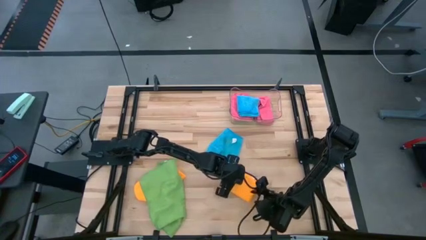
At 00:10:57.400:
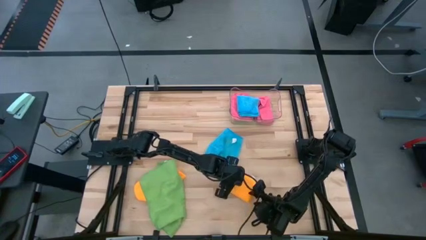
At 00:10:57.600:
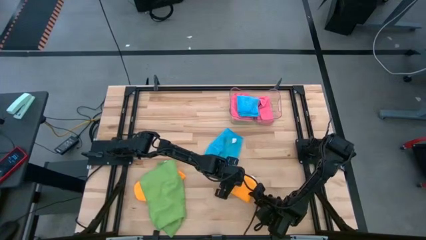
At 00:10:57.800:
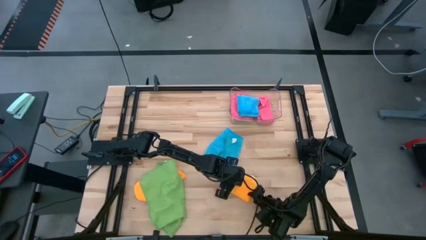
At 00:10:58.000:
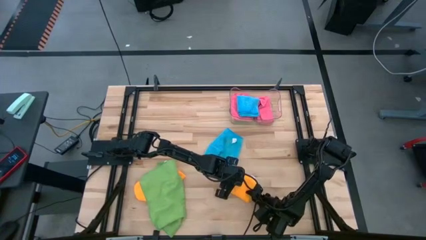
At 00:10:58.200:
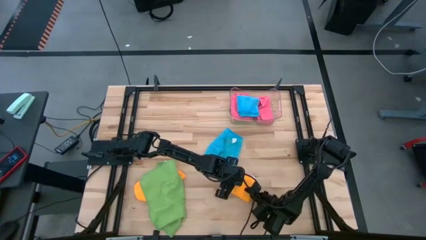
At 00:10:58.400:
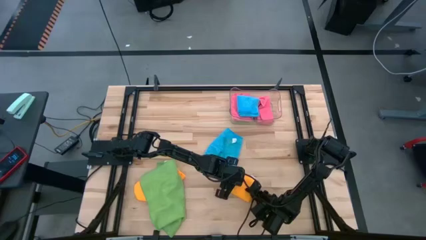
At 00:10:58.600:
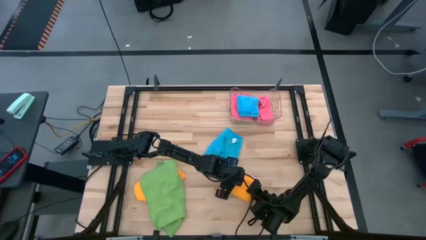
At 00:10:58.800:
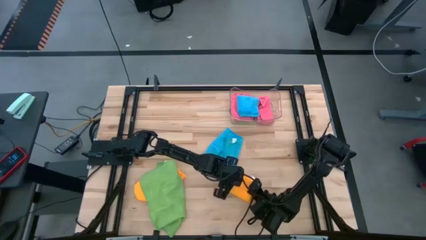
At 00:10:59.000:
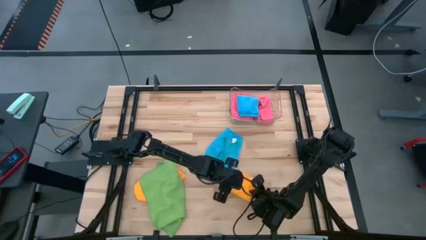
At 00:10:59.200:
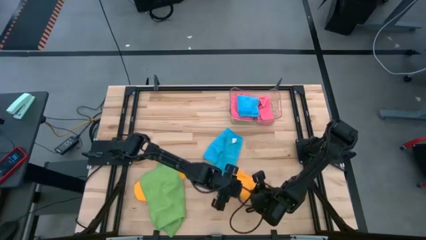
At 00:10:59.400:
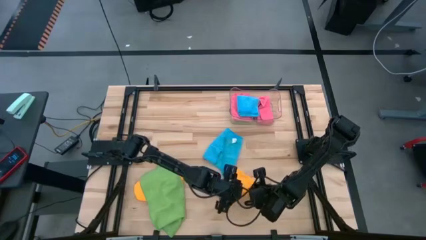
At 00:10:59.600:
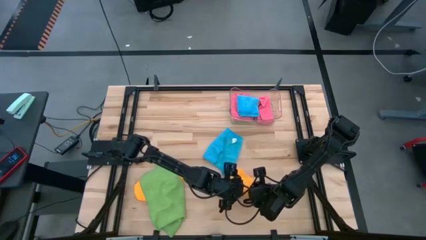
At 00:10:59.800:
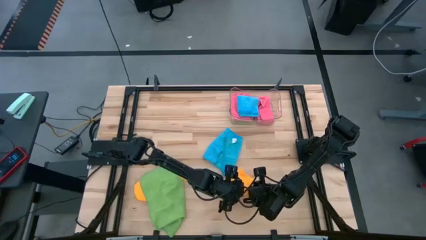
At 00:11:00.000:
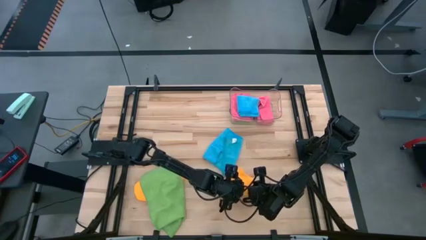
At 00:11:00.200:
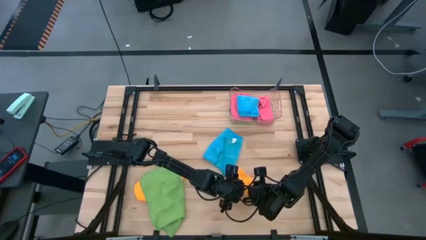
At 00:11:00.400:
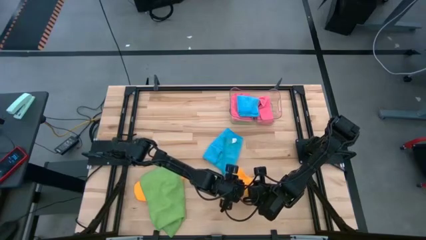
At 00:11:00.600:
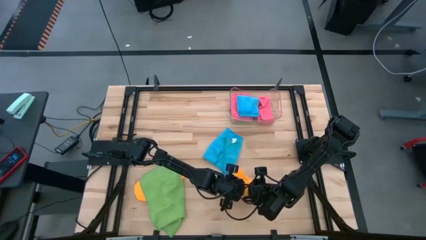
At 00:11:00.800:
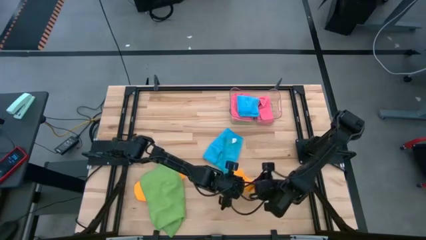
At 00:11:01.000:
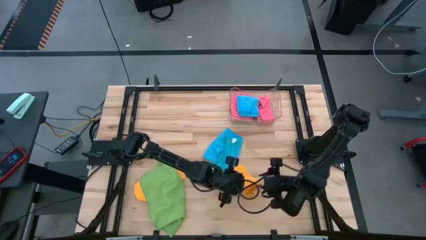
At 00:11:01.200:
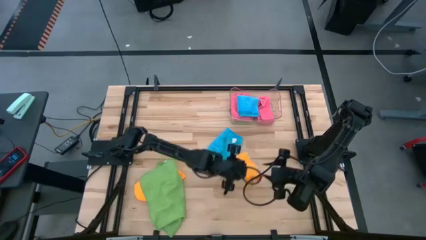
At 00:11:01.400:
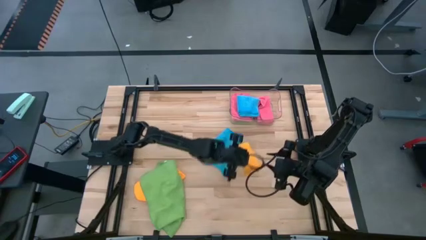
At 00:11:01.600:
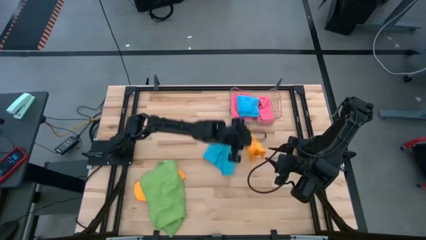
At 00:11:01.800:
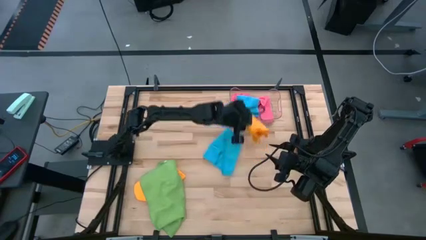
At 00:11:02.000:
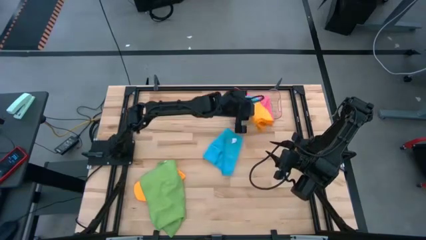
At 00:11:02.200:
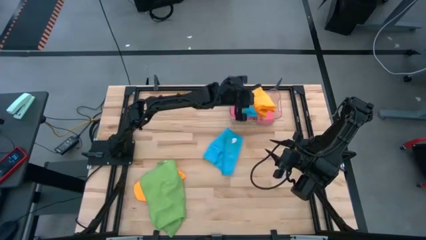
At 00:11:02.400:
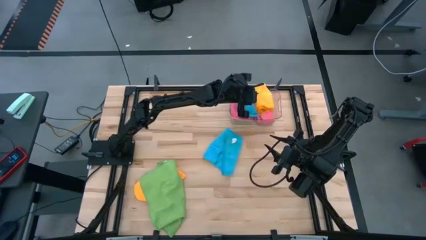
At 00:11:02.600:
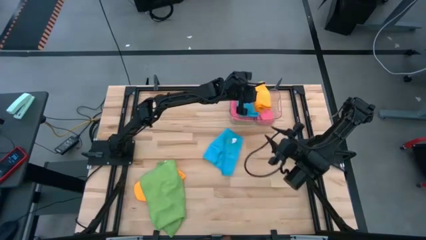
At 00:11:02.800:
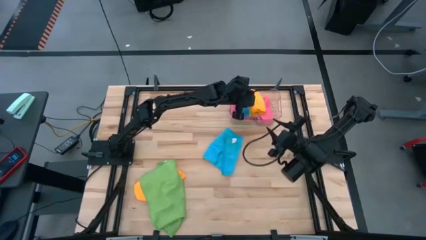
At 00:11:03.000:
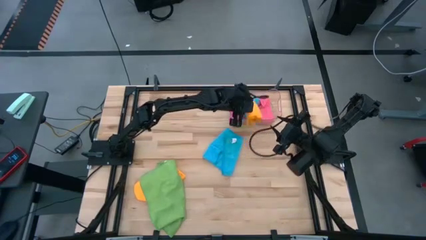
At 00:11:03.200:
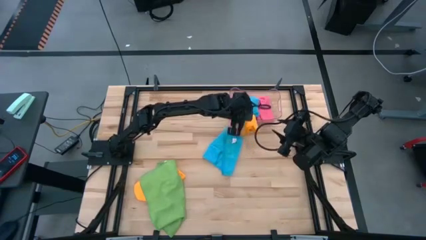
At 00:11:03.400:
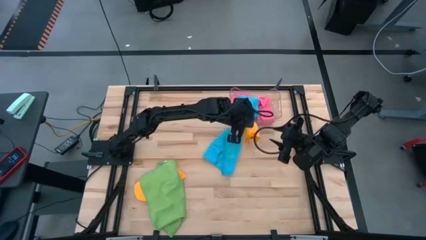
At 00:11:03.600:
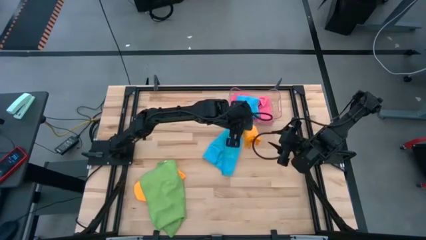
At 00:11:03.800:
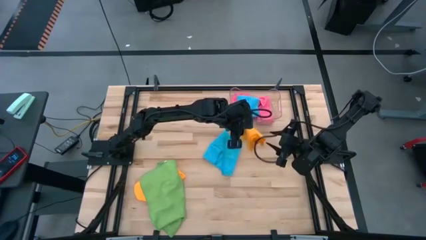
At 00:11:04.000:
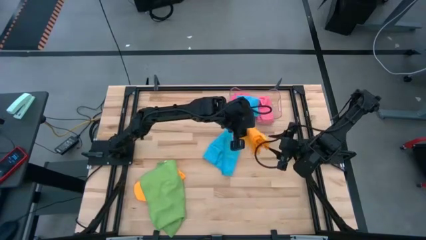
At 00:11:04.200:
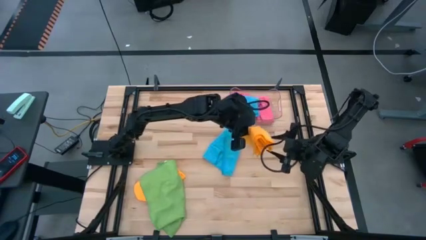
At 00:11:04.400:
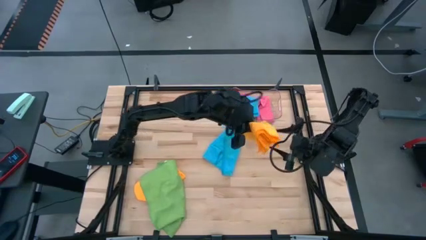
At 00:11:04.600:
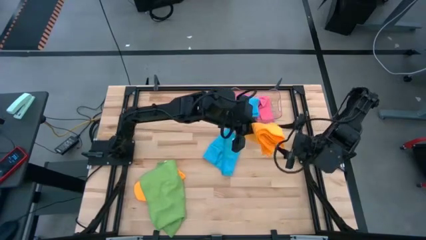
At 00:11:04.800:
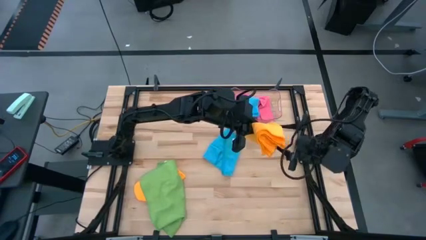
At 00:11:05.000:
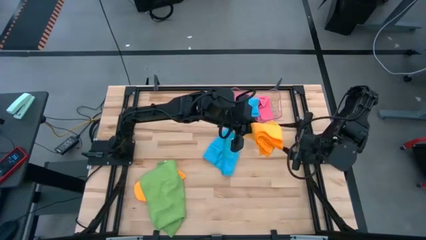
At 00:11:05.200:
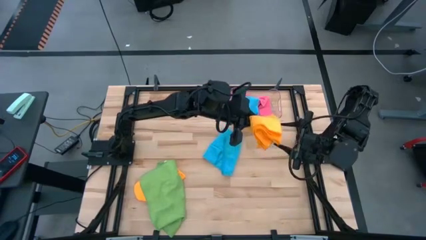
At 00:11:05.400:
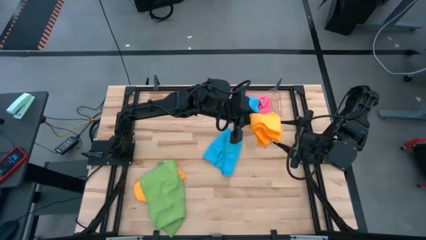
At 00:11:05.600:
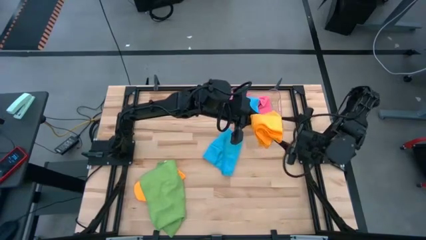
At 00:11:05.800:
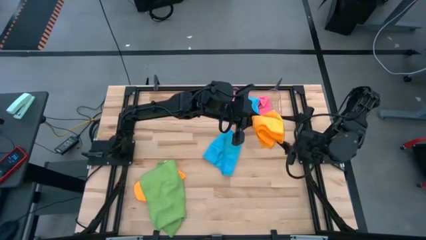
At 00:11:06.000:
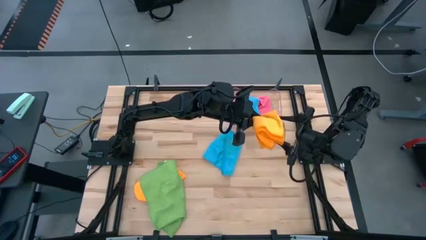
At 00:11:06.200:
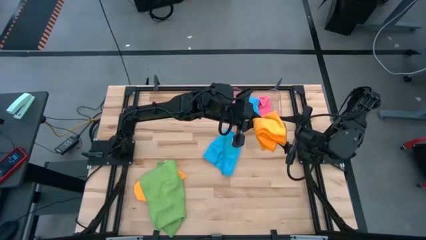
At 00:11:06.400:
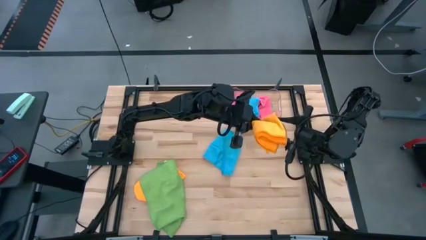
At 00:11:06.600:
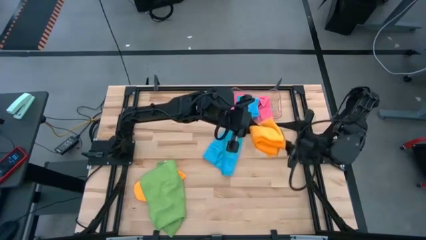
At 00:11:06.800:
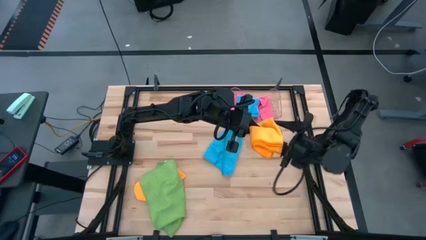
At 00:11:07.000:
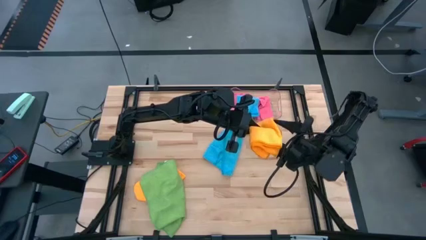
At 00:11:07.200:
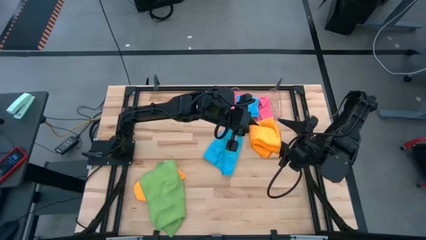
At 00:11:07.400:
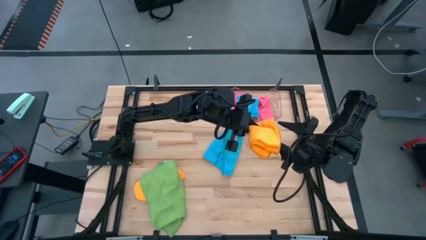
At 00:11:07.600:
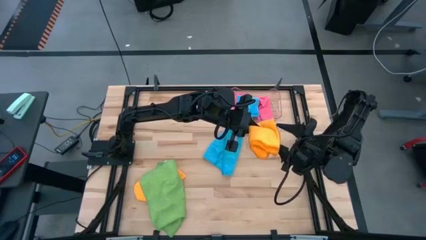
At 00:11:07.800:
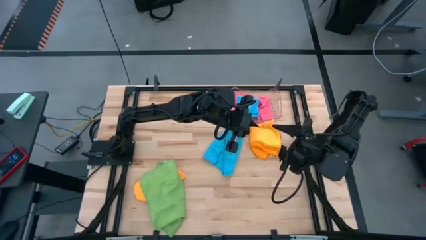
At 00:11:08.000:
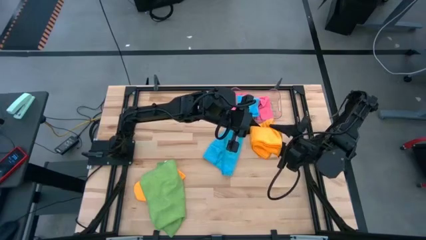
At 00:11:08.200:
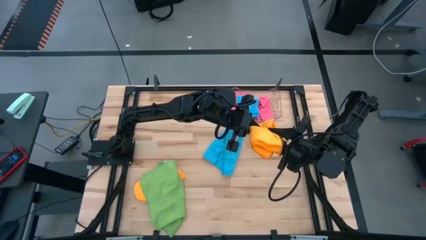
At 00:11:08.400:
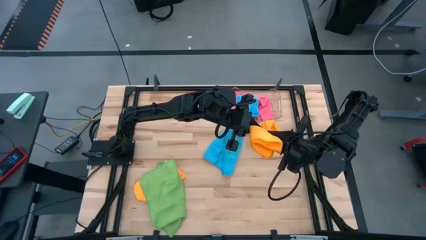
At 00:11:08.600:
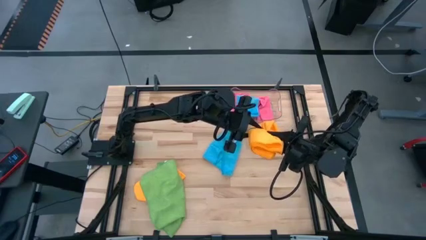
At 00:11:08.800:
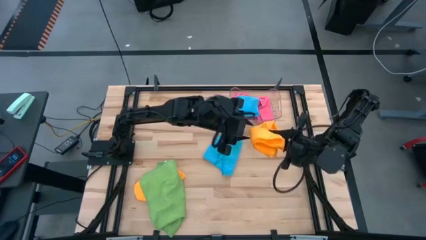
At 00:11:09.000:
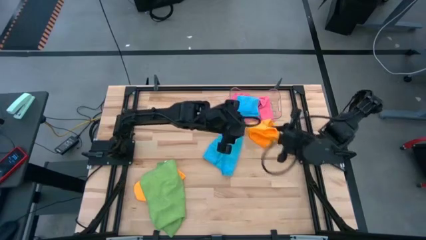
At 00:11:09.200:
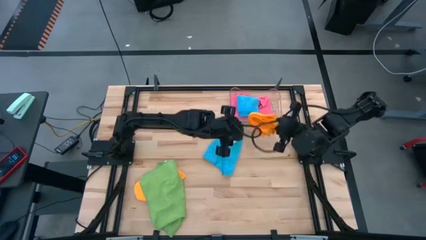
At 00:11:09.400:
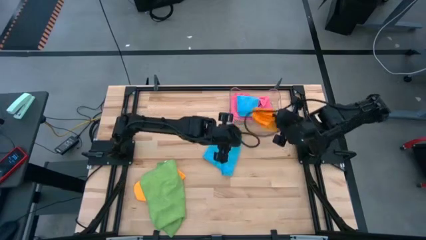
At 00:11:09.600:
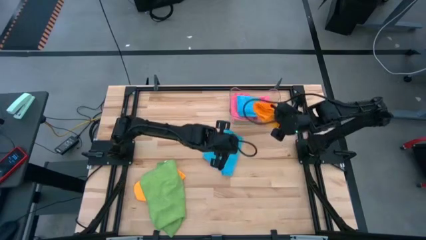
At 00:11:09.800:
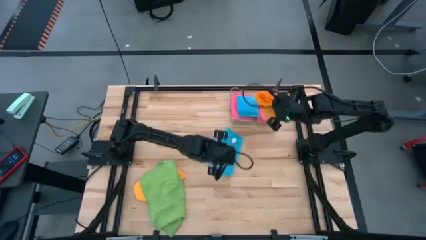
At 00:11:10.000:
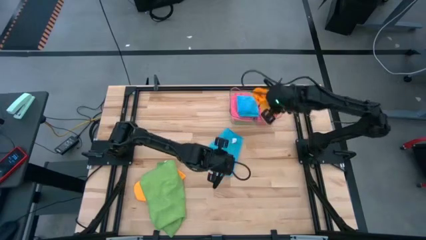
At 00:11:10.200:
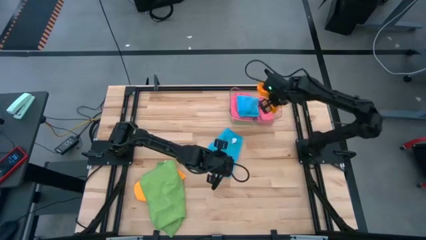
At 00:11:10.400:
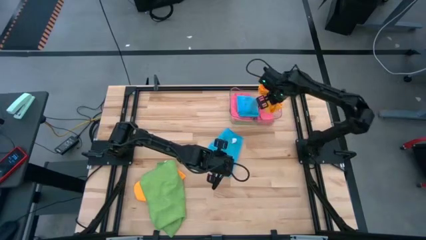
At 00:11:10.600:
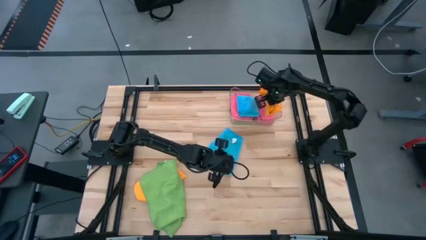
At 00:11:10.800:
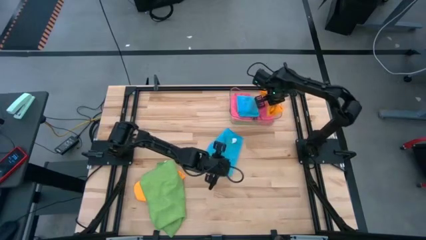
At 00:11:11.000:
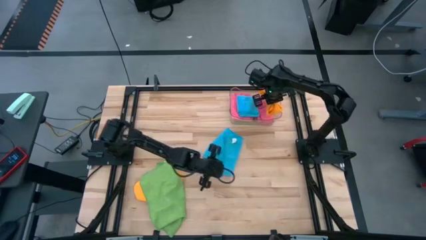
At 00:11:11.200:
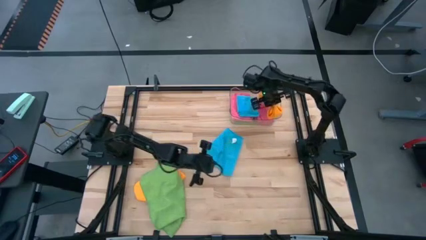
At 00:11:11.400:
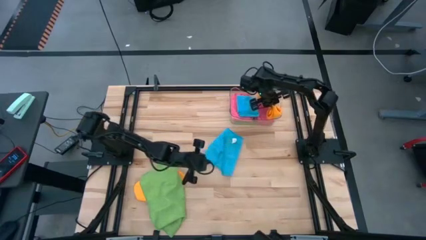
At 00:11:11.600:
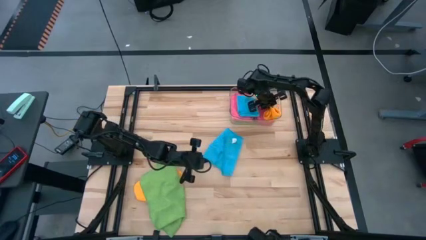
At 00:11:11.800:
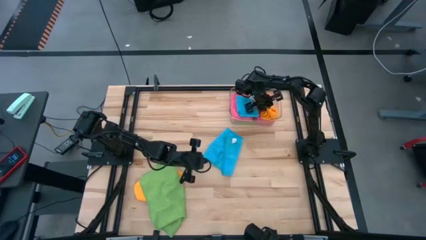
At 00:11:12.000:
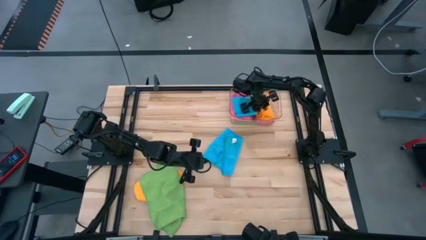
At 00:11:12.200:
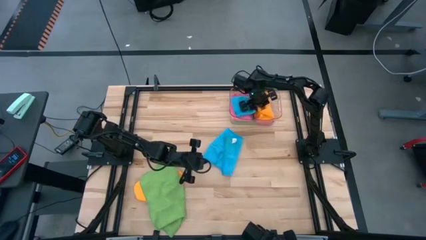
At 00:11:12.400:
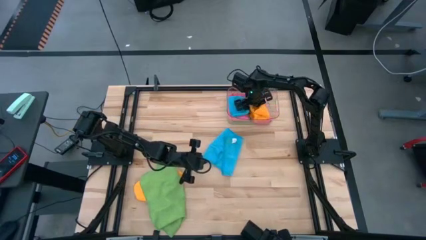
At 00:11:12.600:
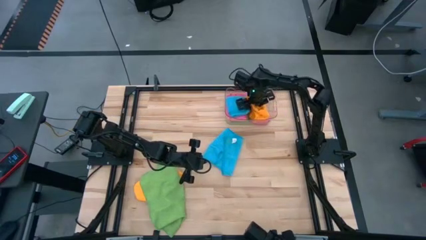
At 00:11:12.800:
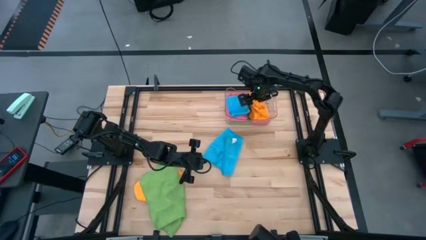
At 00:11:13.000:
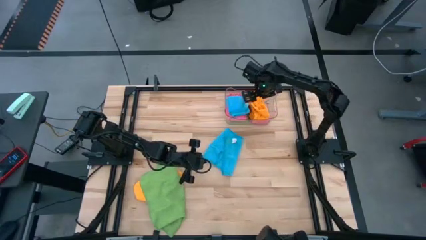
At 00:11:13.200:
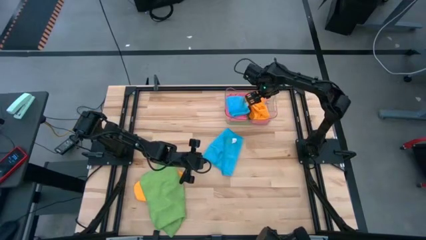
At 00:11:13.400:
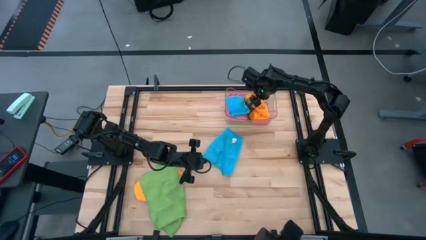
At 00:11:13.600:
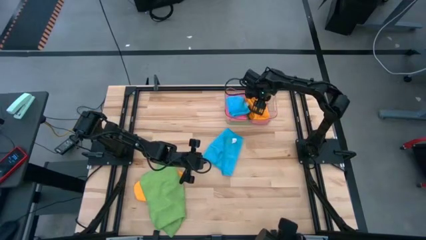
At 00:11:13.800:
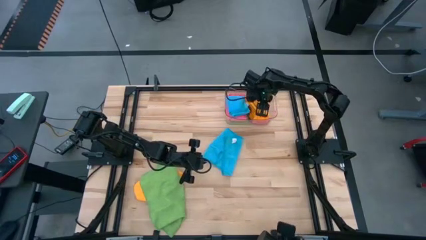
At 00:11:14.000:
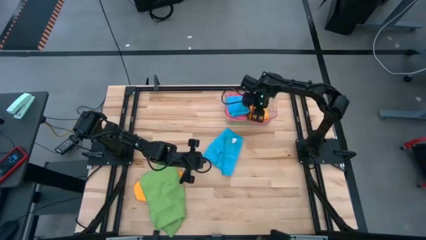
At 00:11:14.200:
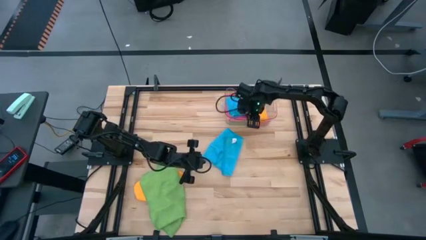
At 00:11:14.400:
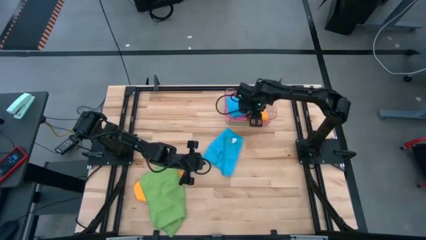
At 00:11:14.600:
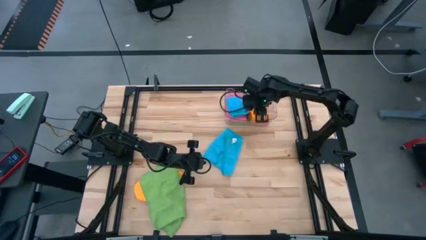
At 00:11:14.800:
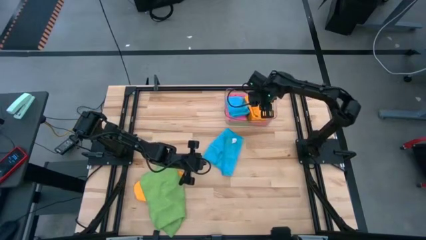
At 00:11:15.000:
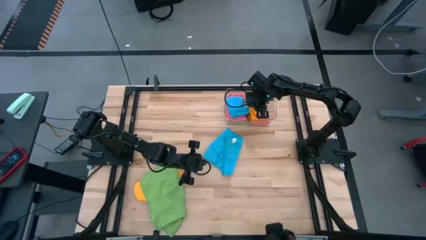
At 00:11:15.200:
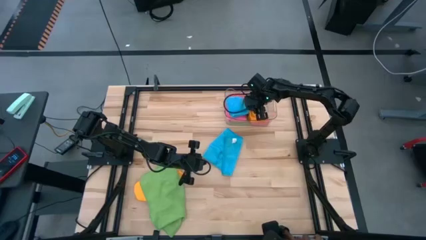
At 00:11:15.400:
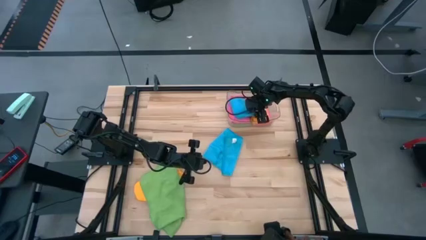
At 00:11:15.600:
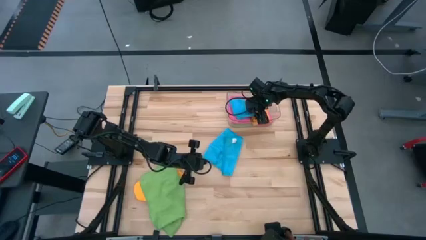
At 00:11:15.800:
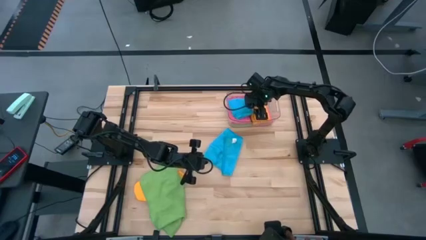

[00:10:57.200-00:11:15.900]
Task: Fold microfiber towels
Stack the right yellow towel on top of the pink towel
